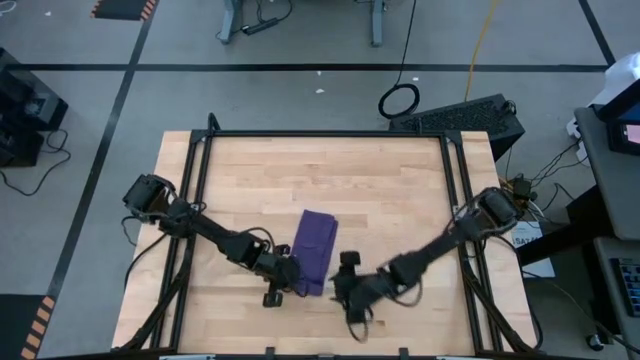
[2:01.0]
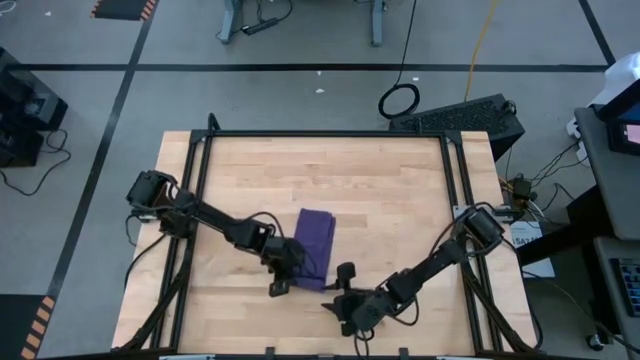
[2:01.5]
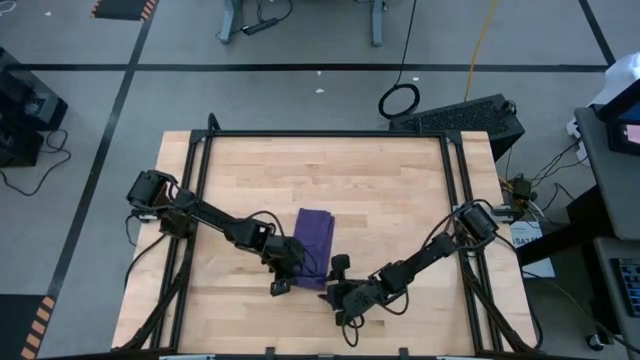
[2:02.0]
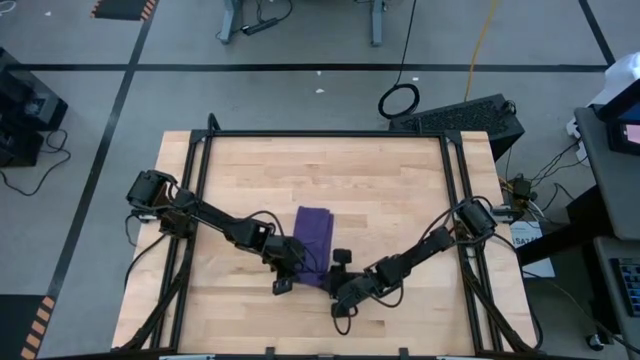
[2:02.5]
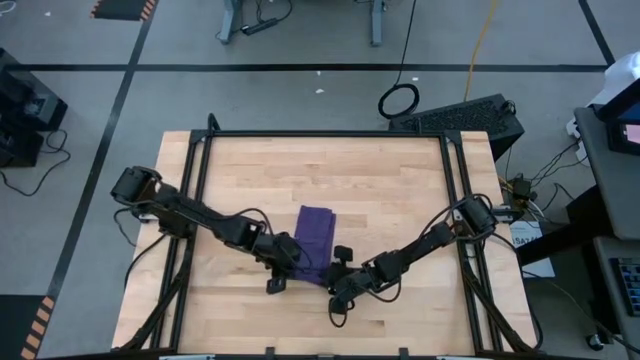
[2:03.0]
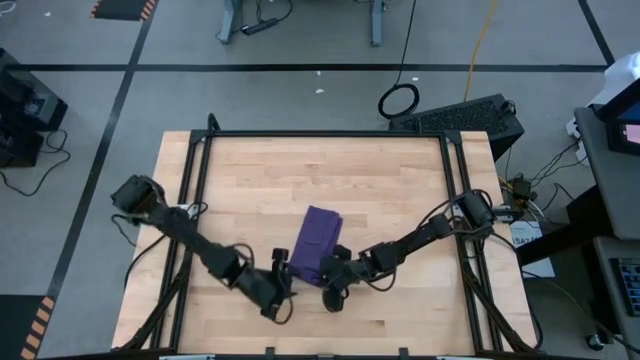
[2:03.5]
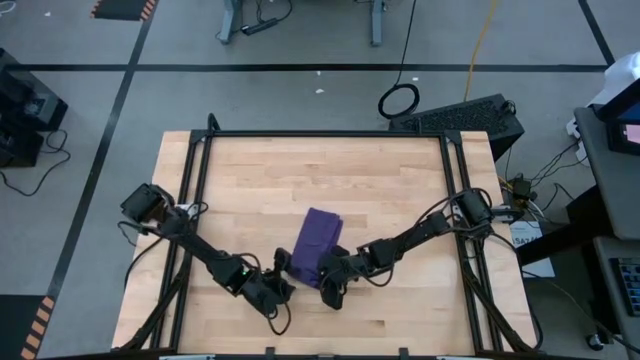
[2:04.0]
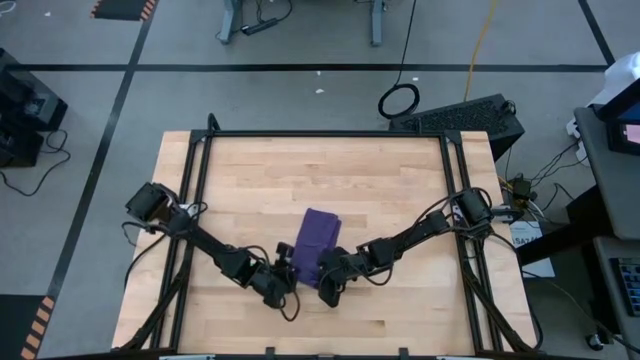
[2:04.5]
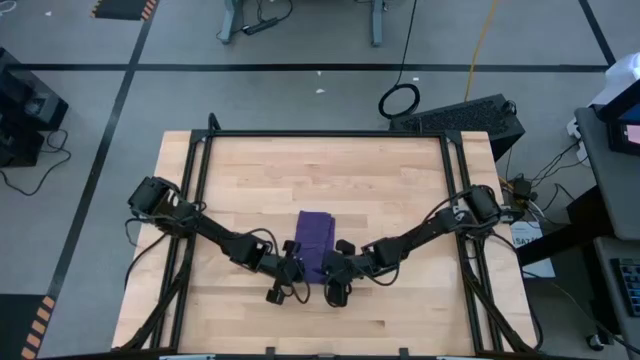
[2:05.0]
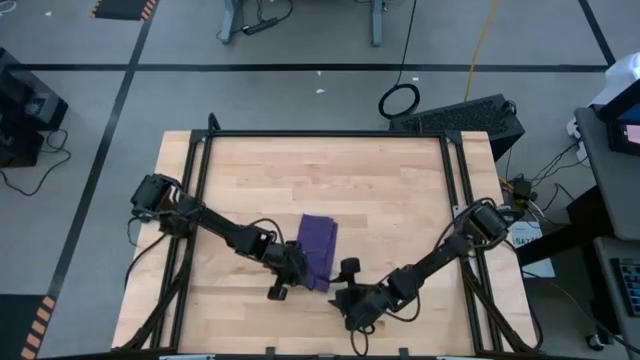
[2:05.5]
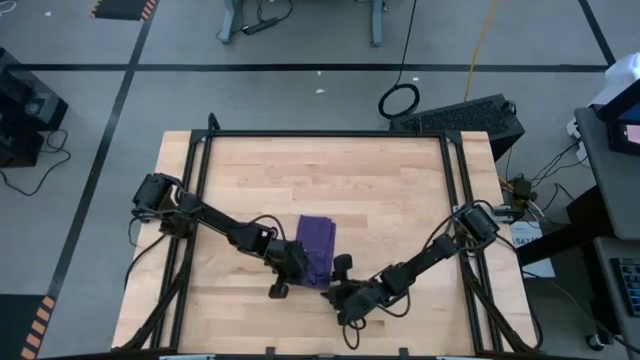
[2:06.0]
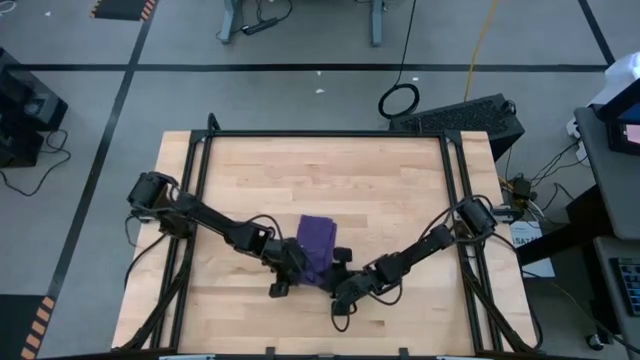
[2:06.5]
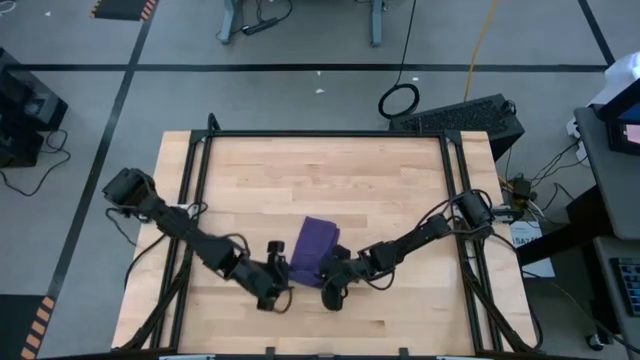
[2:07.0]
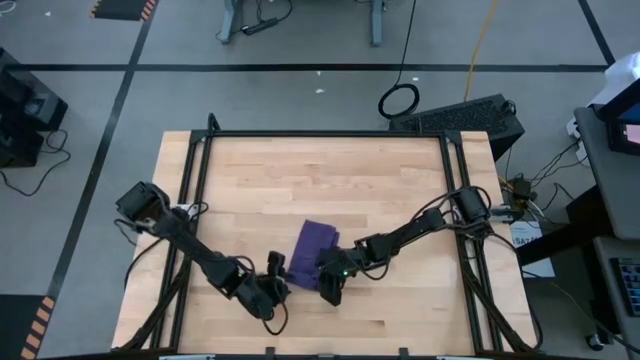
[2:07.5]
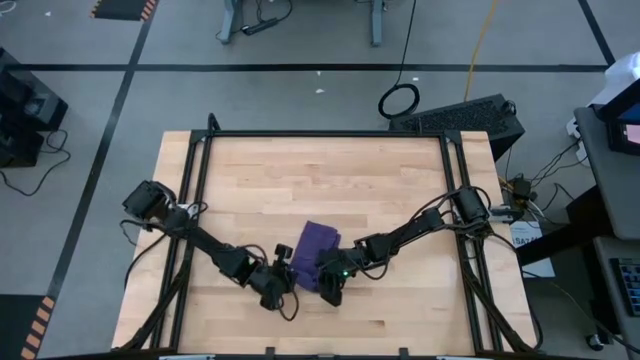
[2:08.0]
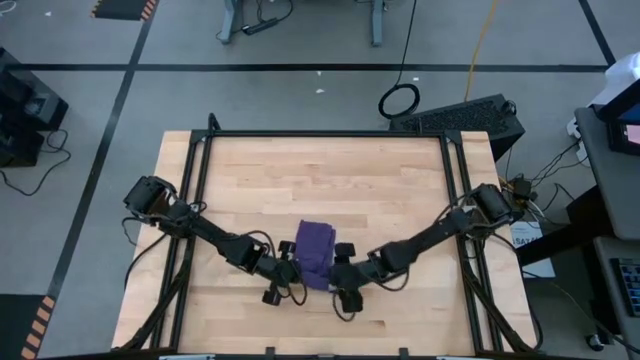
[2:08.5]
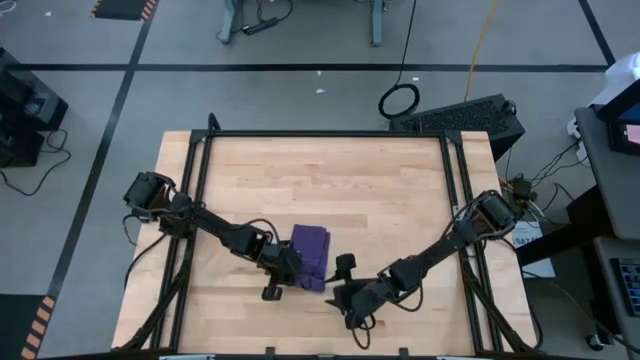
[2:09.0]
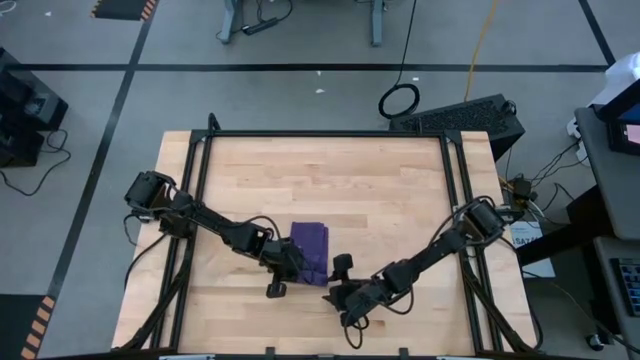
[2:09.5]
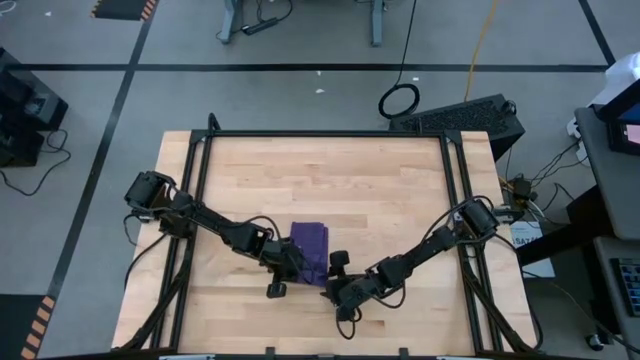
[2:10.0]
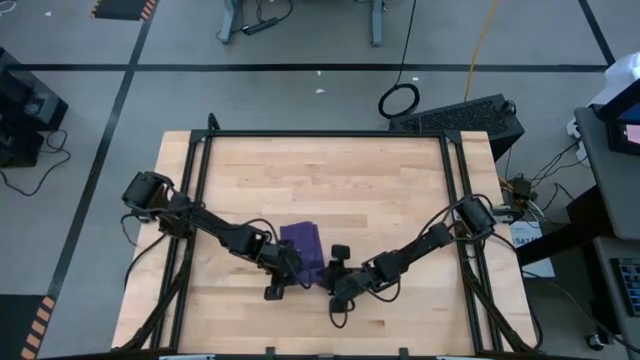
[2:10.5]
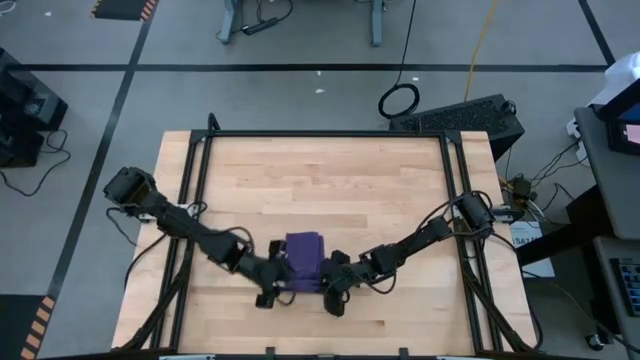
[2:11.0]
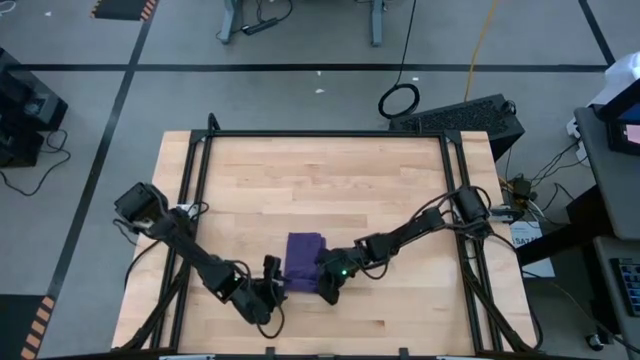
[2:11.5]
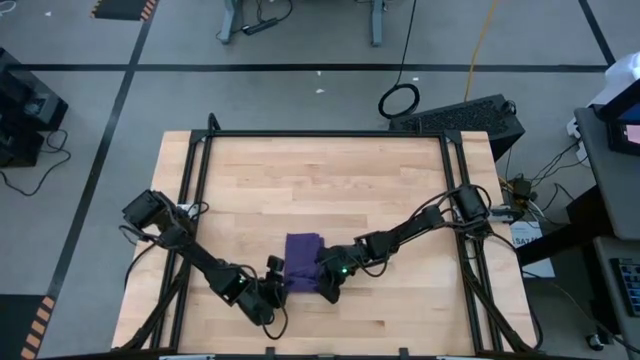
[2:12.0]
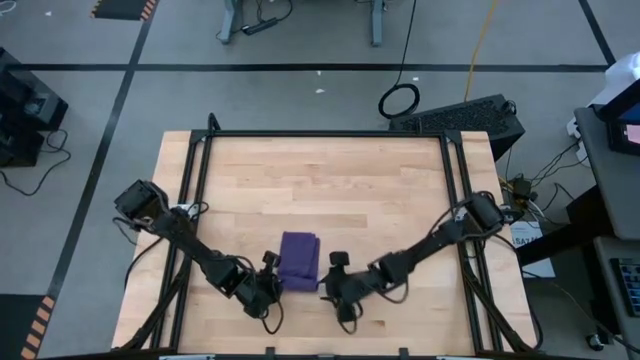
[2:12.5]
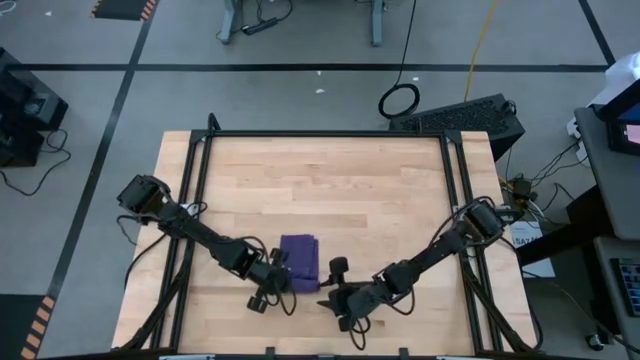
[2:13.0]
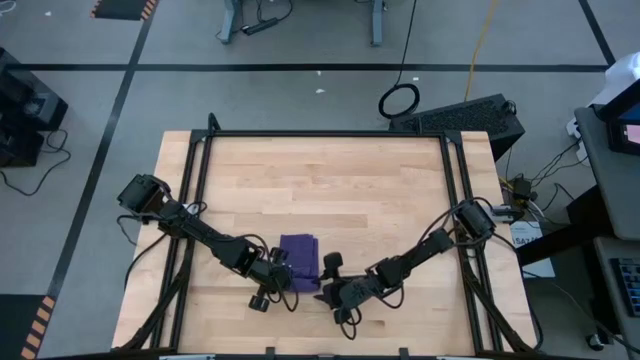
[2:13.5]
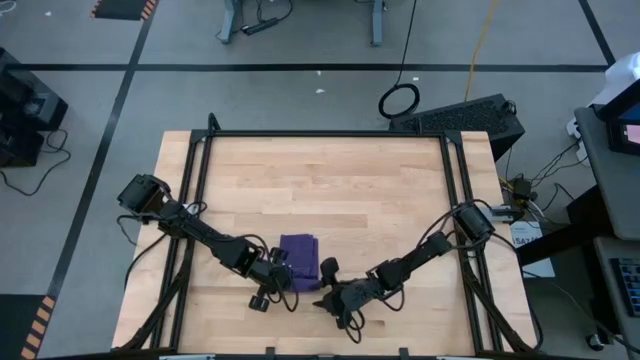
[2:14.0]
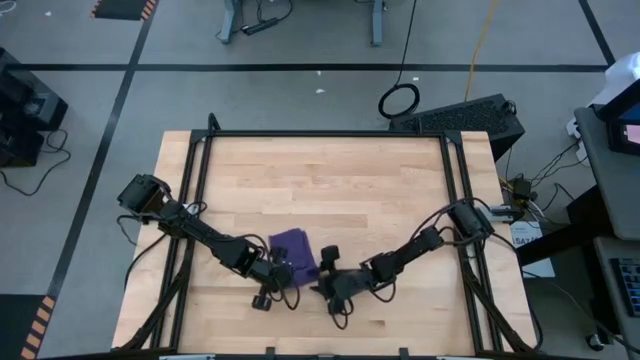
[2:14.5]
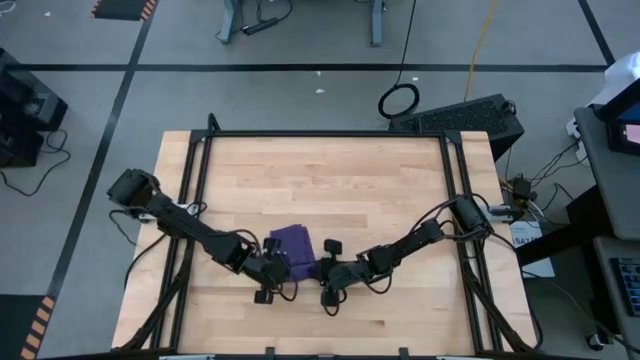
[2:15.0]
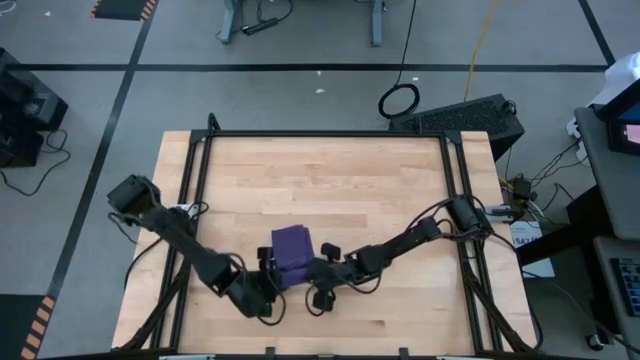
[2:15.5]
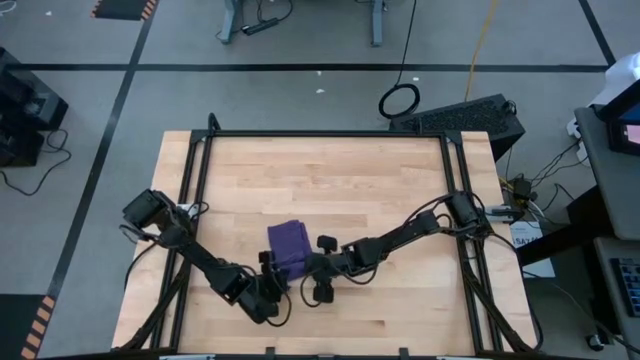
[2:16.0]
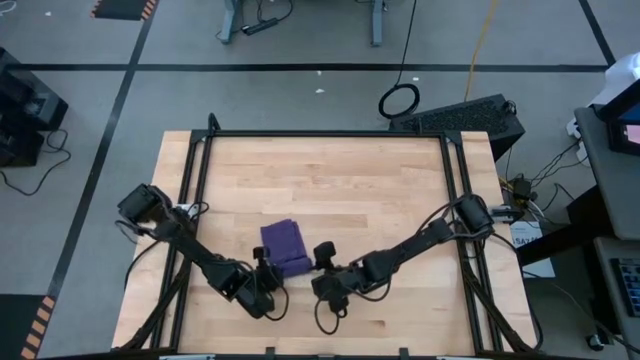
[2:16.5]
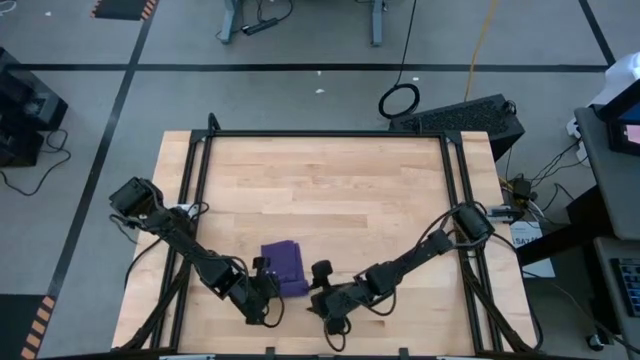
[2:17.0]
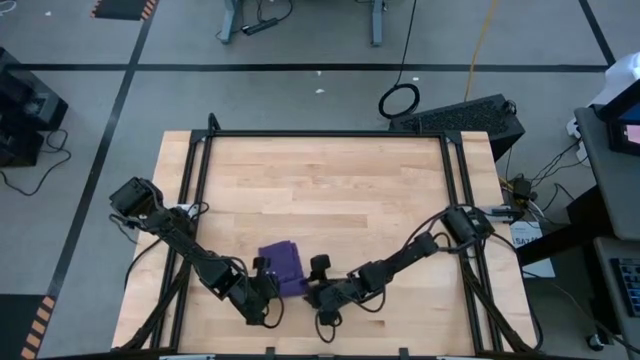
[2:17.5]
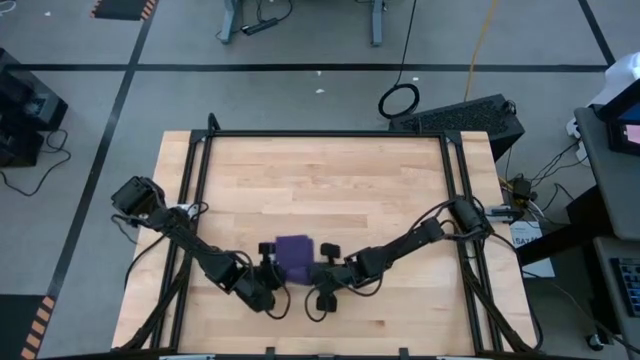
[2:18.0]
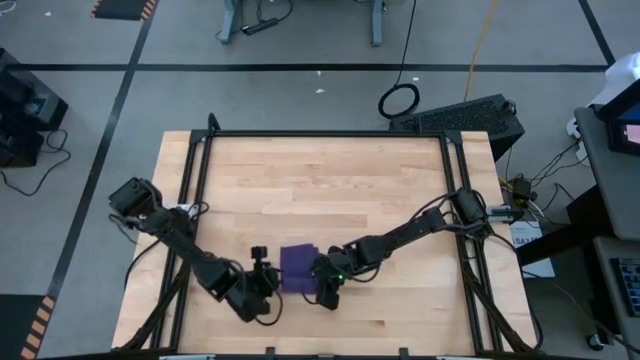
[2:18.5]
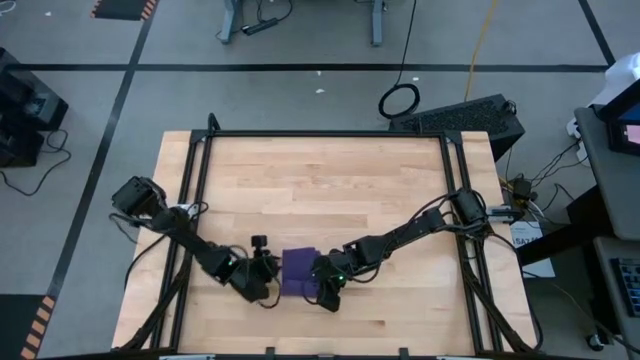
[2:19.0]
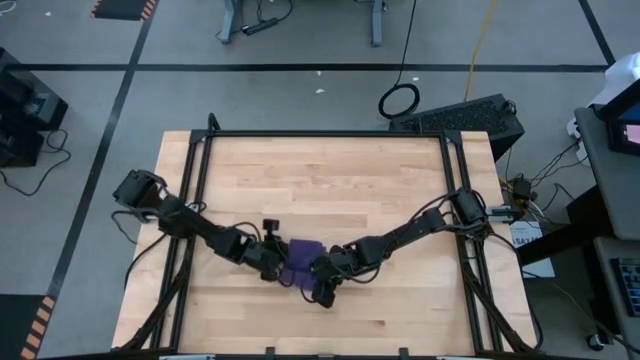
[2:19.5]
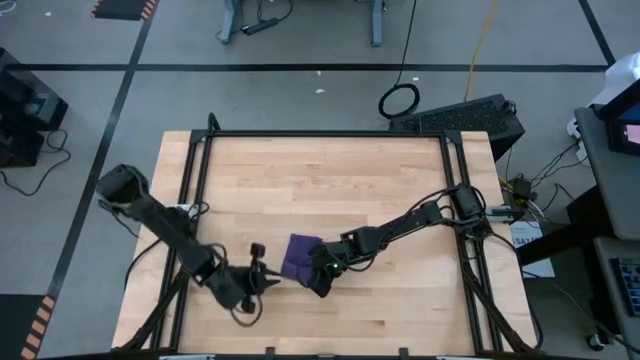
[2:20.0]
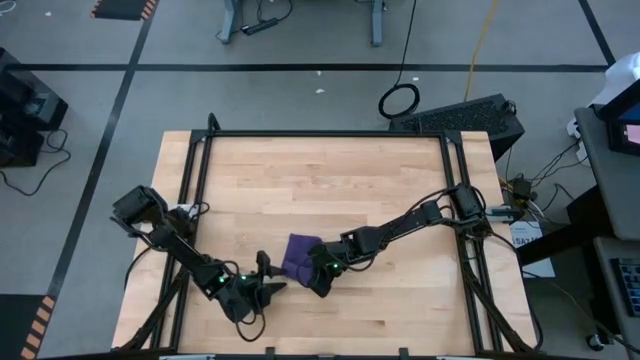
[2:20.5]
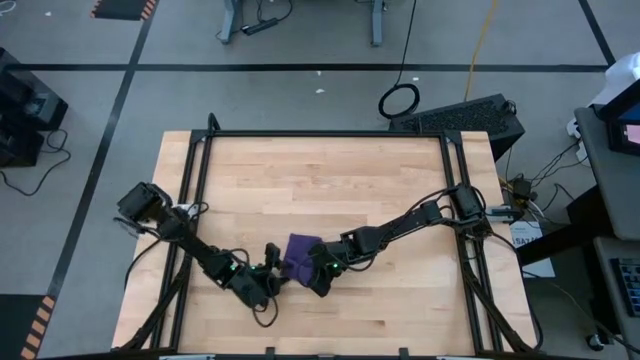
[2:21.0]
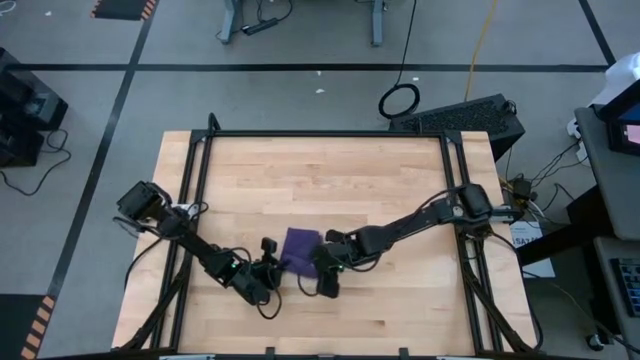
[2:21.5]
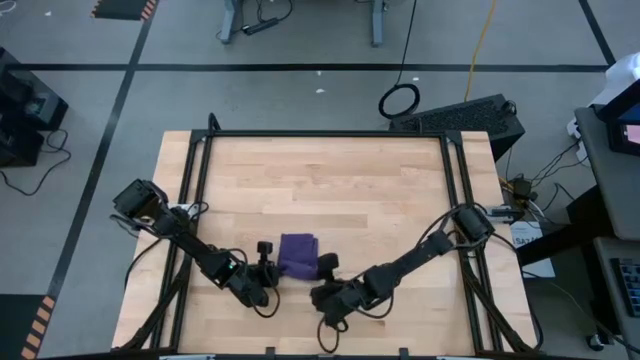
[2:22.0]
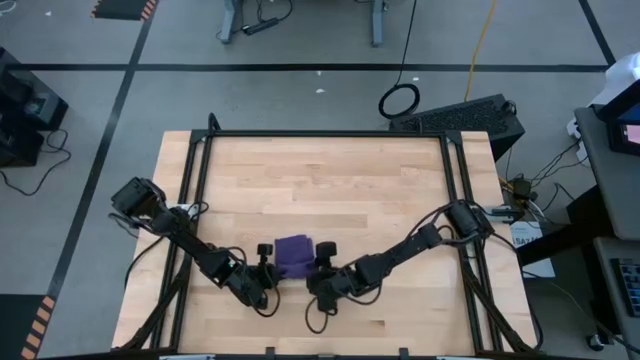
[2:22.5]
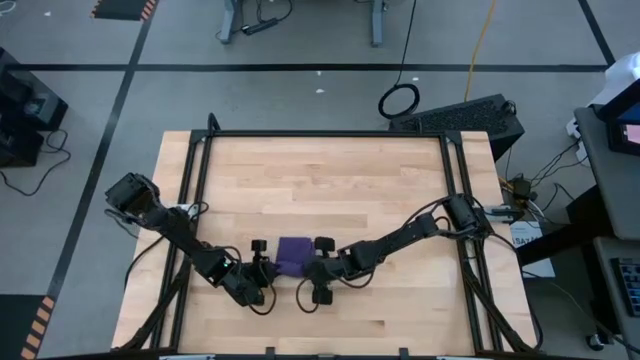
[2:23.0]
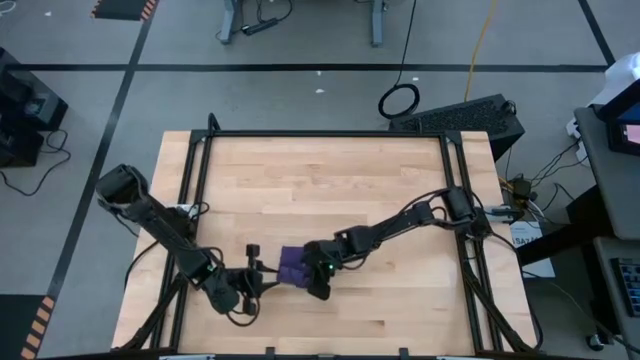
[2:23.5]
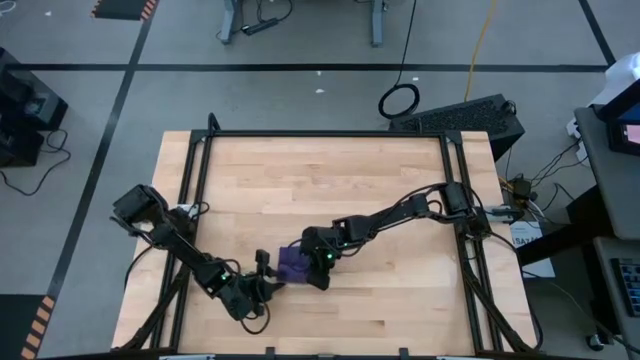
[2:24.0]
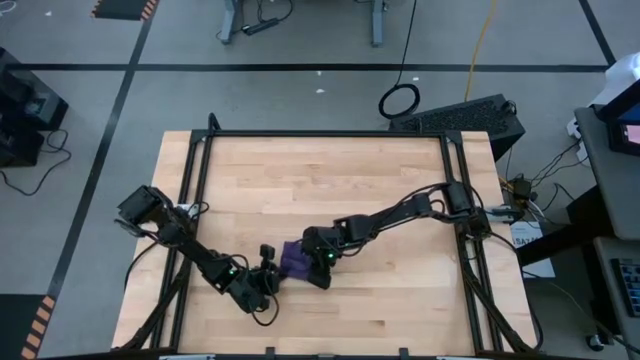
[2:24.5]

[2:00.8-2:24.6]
Task: Roll towel into tight, uniform cylinder
Roll the purple towel on the table
